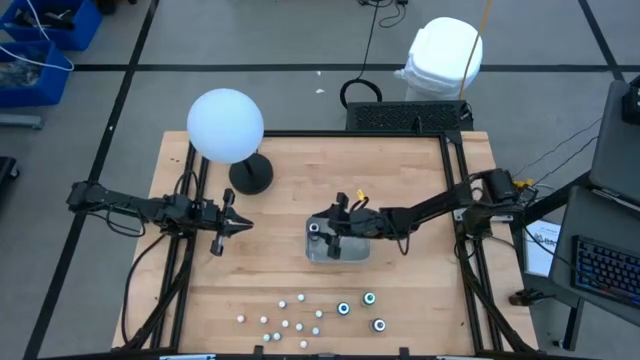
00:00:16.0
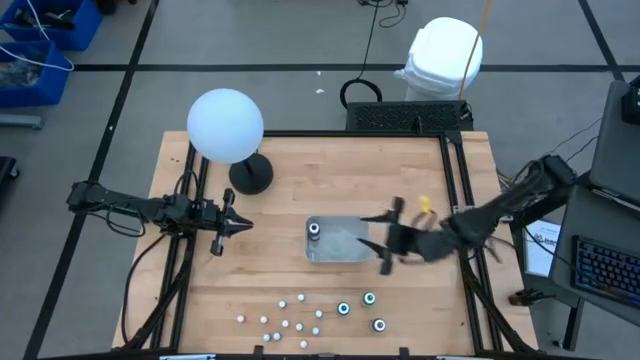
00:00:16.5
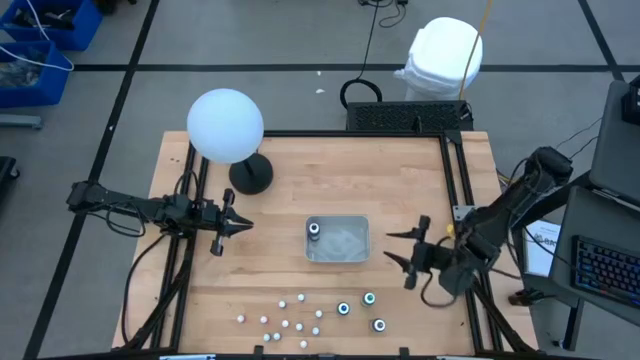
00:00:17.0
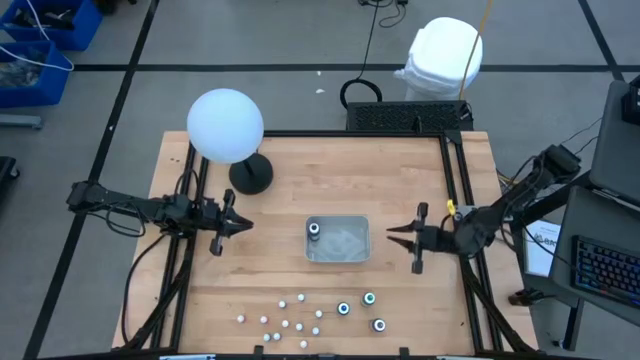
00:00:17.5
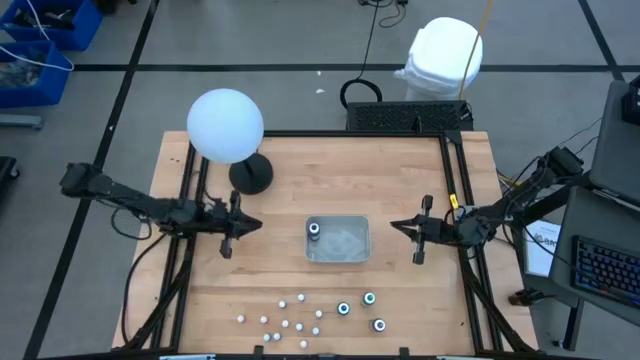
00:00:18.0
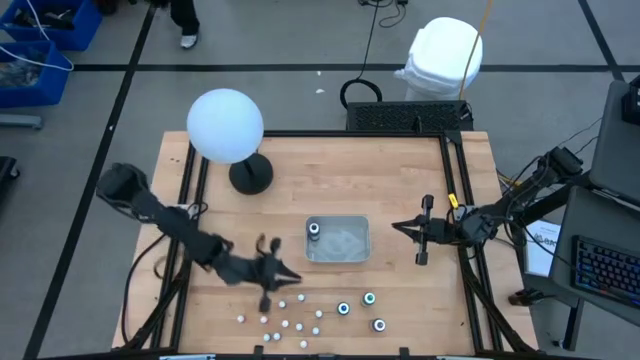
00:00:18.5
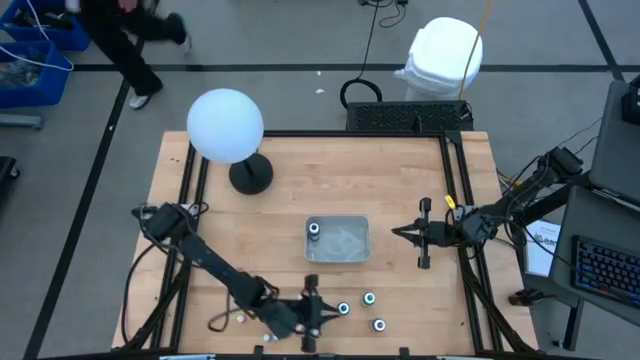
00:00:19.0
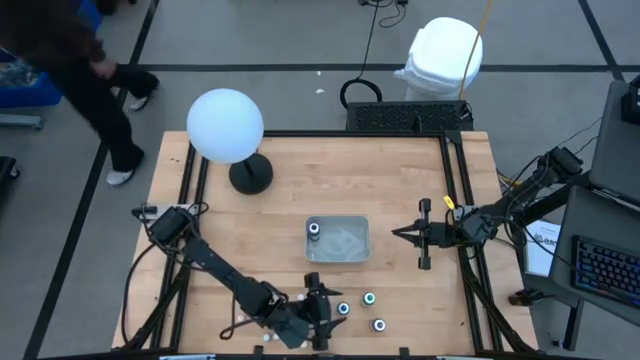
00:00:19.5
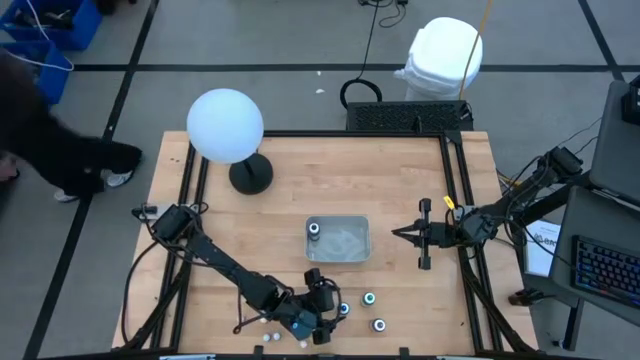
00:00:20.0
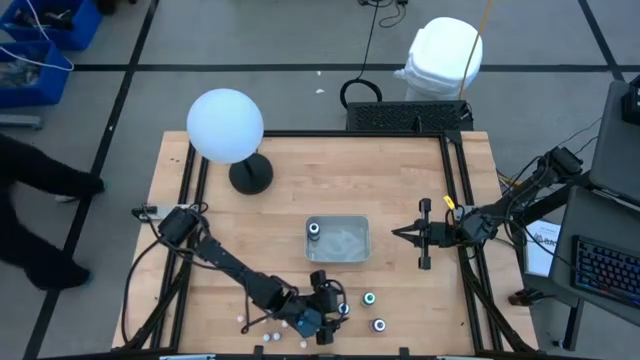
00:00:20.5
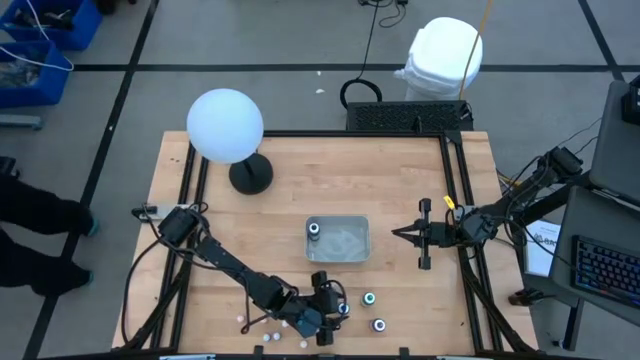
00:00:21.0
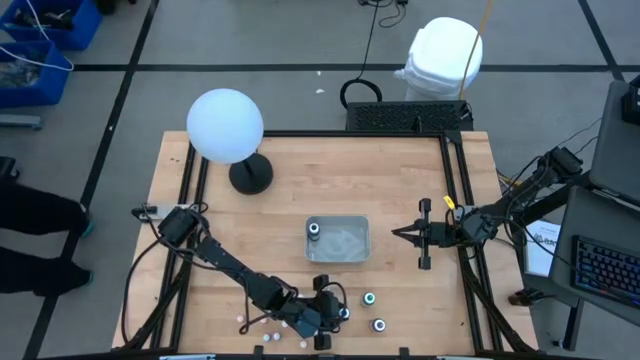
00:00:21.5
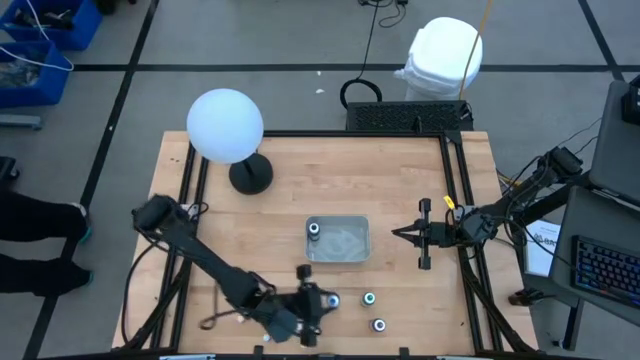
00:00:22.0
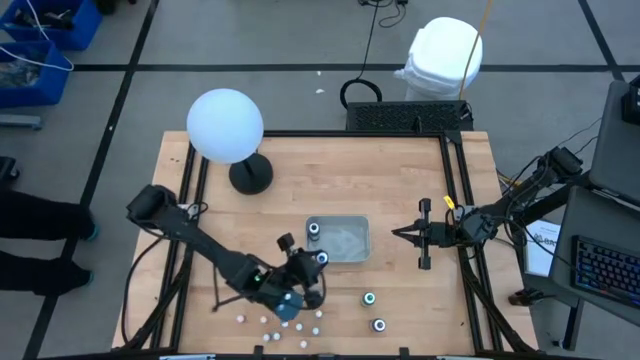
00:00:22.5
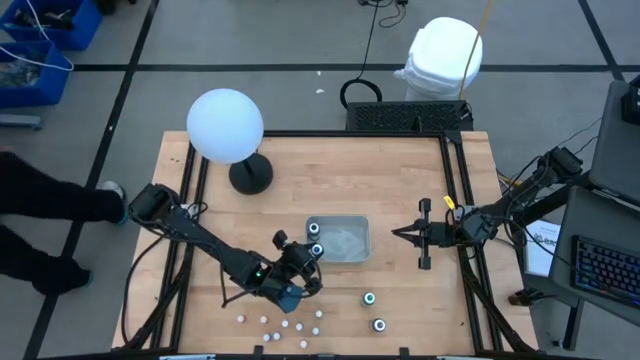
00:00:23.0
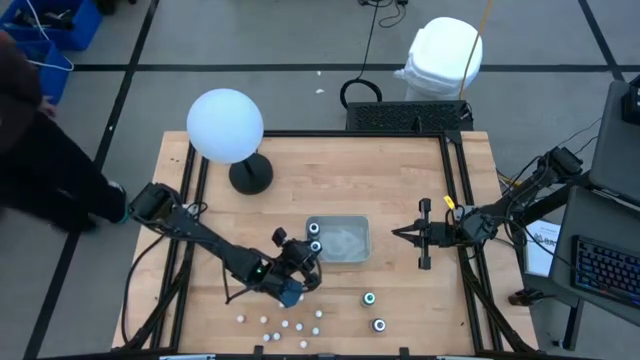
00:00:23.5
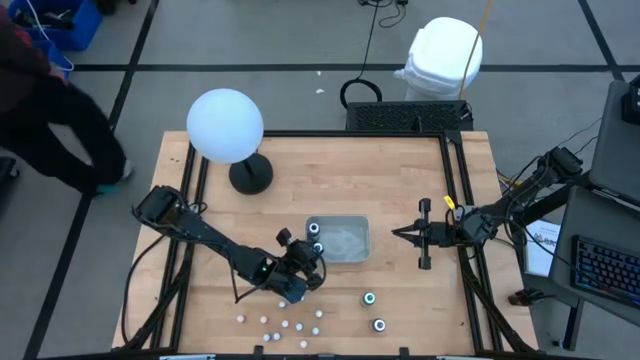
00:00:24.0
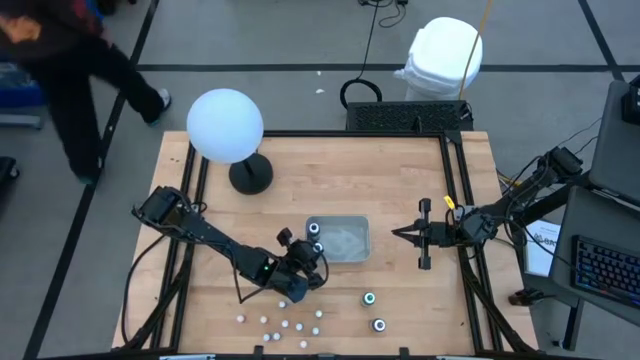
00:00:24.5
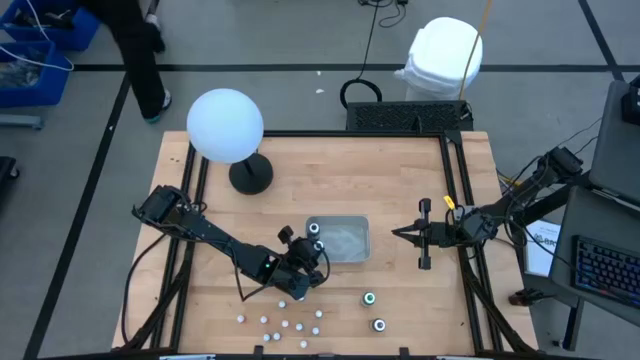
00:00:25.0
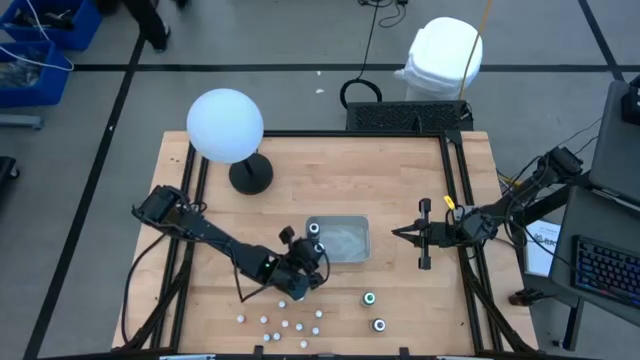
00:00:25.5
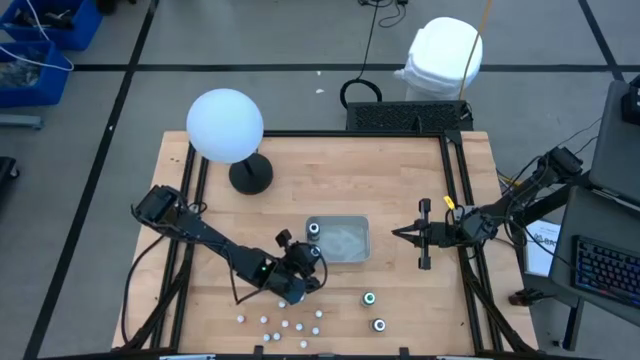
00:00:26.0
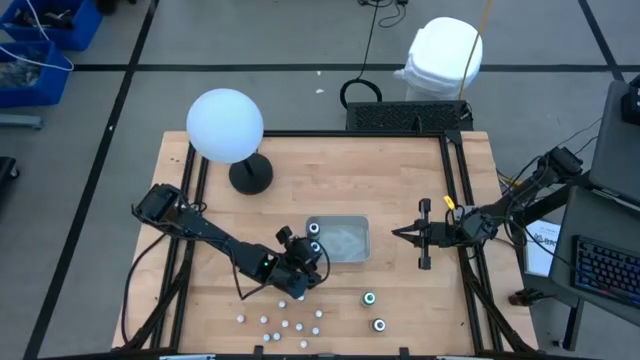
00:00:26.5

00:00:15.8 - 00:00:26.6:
Task: Pick & Place food coloring
Put the large blue food coloring bottle into the gray bin

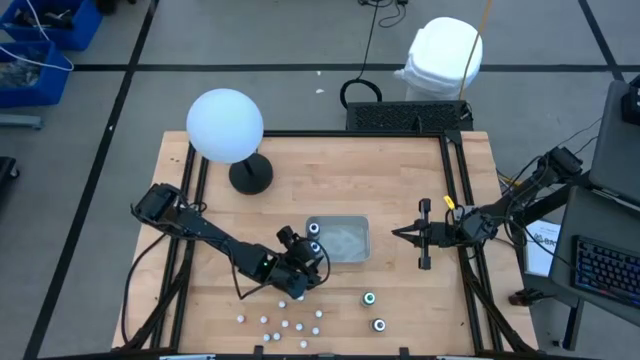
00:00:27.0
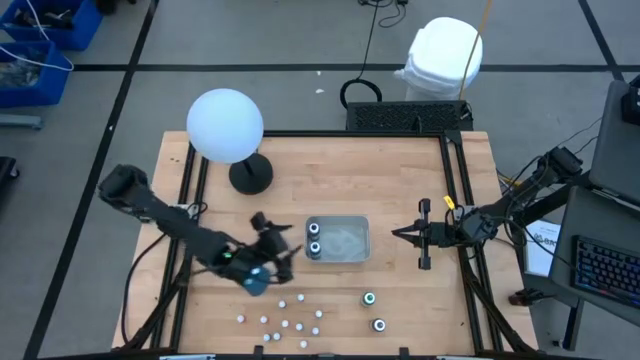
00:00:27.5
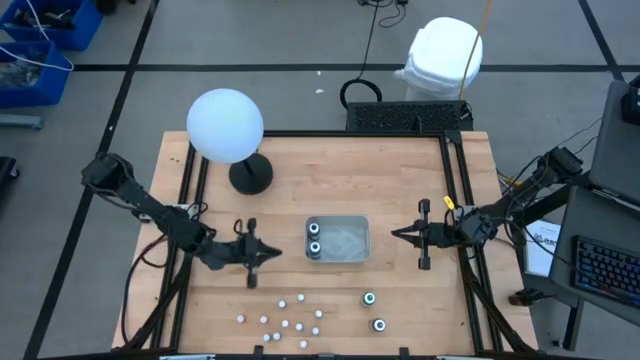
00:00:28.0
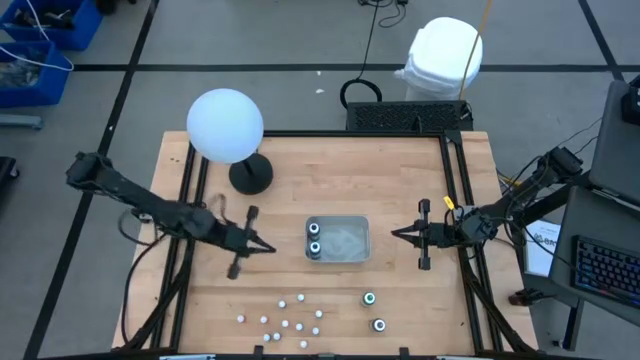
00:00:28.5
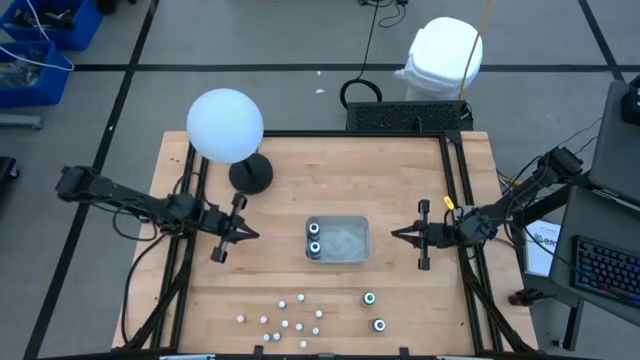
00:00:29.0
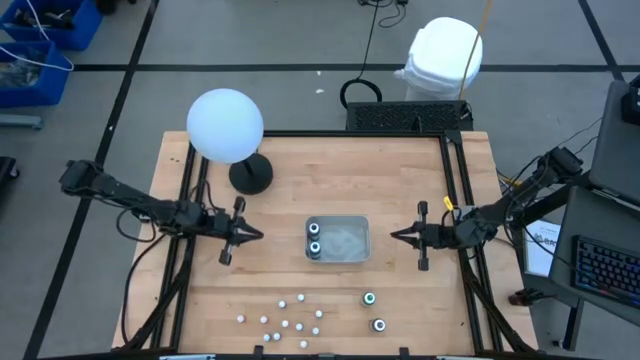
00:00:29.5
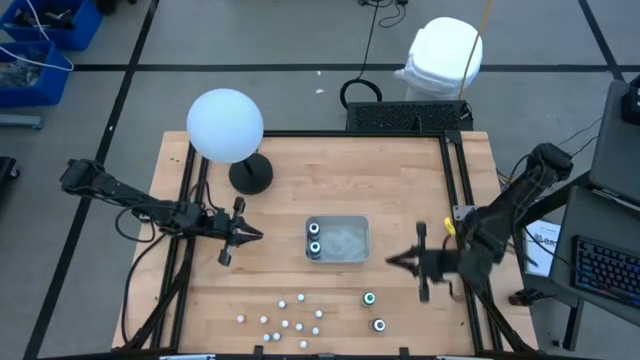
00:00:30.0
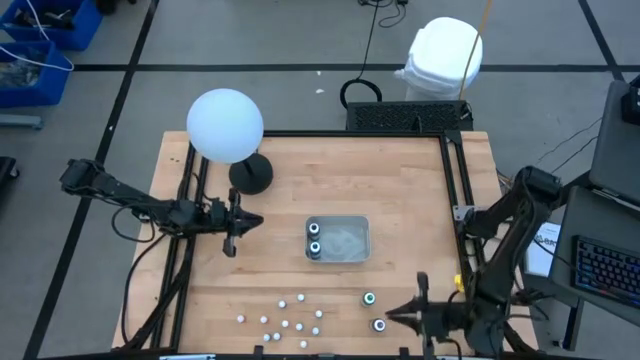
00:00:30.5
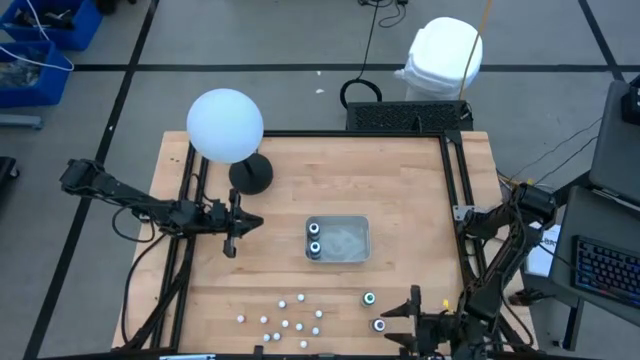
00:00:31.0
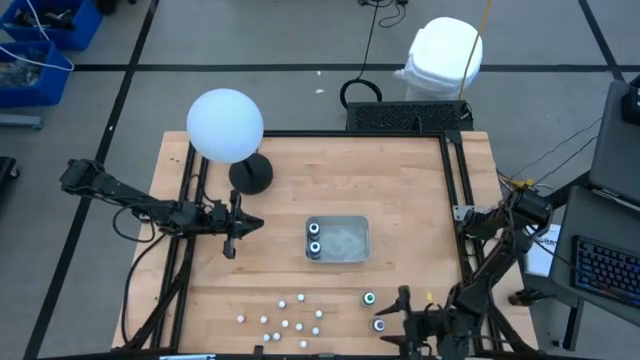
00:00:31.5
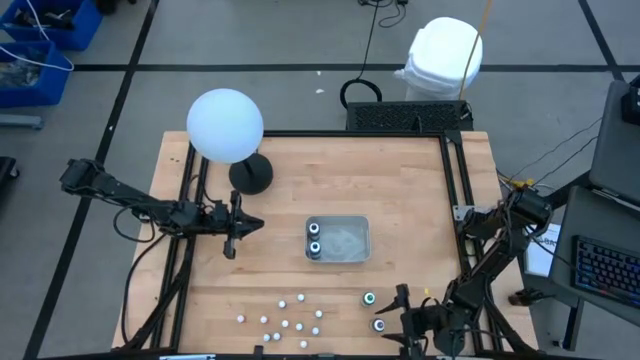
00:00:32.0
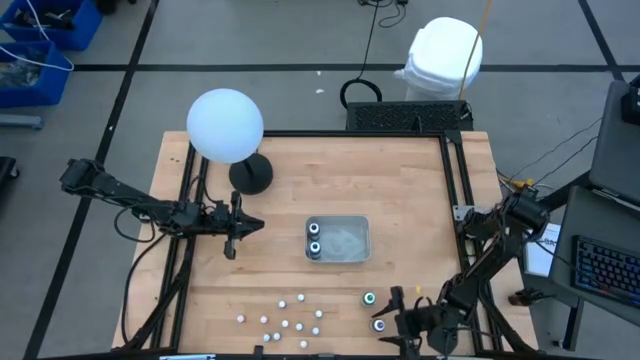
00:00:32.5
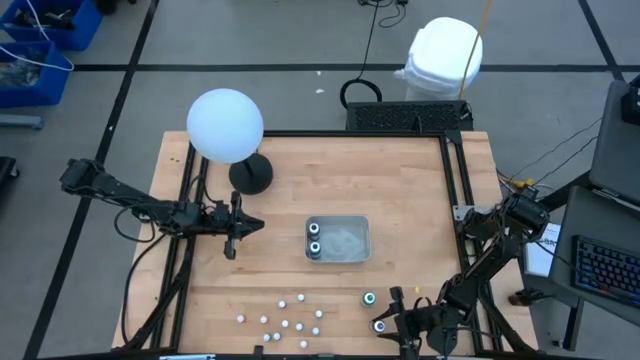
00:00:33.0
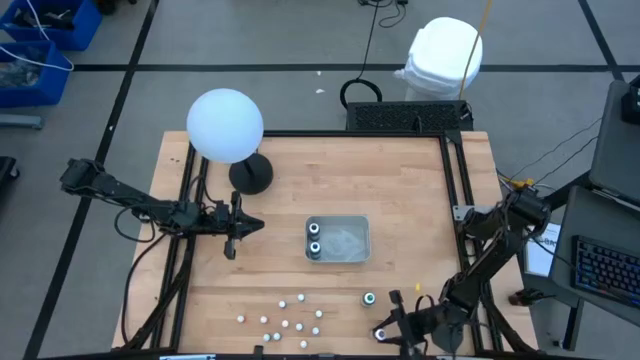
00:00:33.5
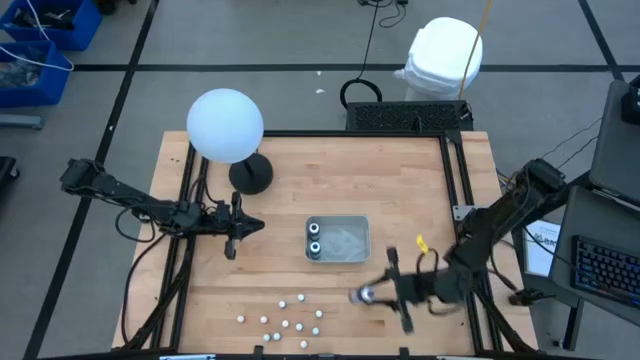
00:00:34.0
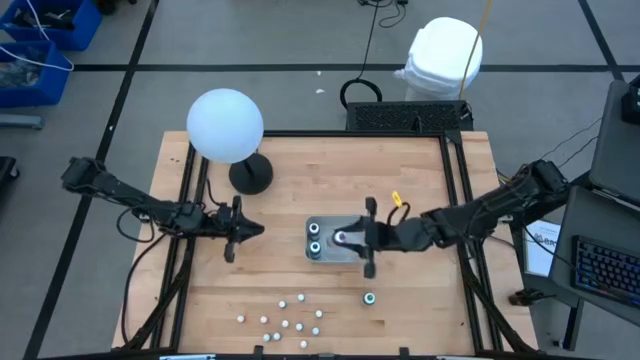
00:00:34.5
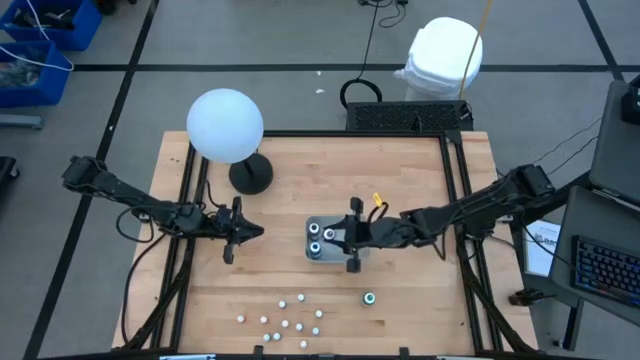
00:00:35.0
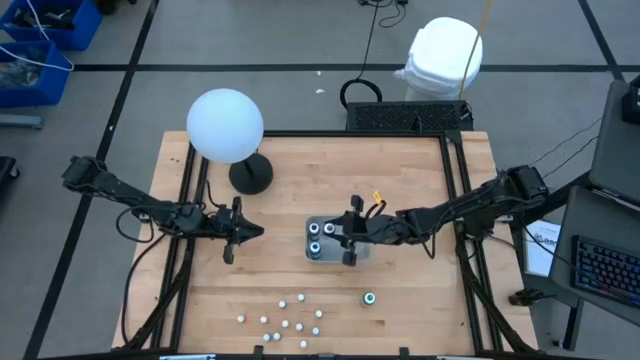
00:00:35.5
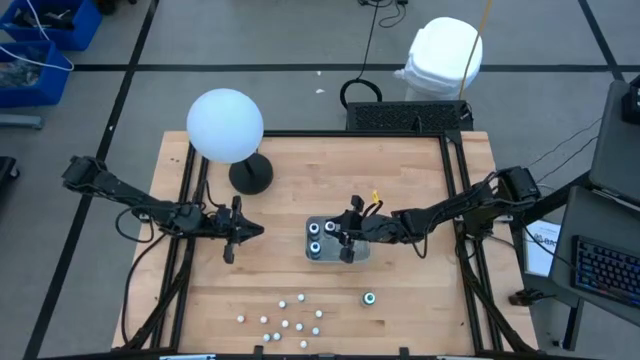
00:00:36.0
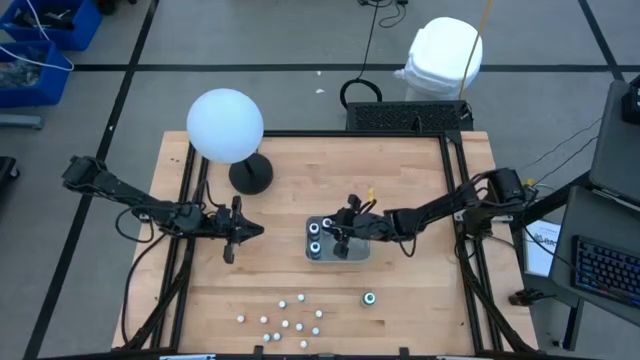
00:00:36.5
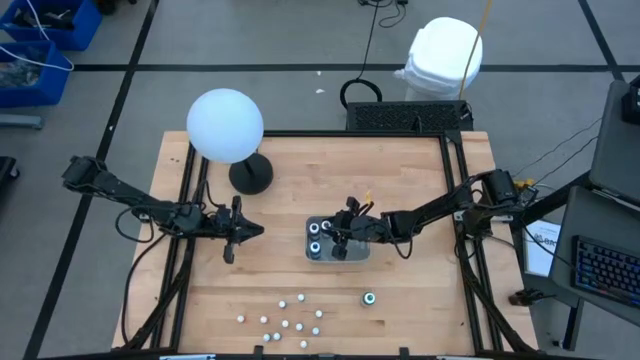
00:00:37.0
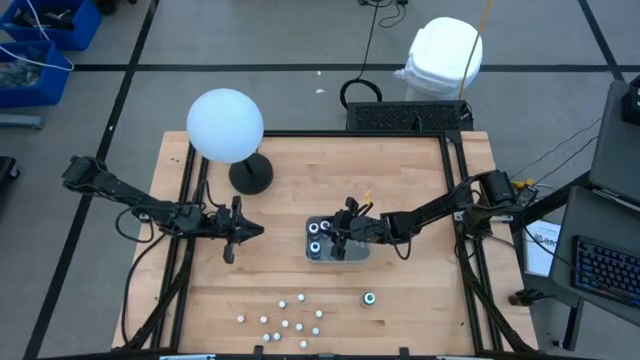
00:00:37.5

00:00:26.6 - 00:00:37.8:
Put the large purple food coloring bottle into the gray bin

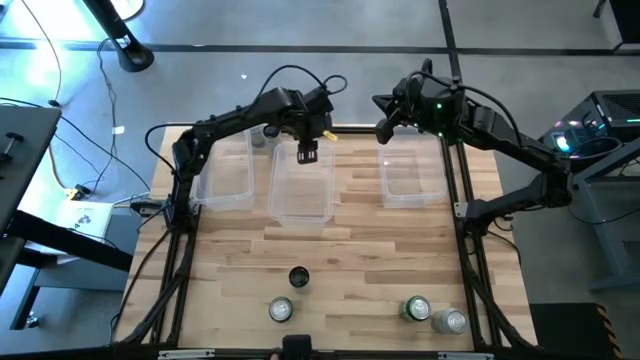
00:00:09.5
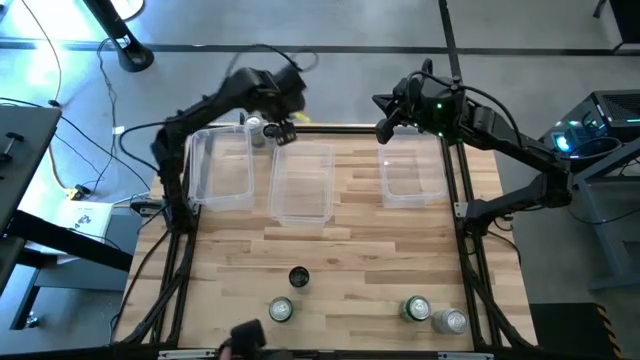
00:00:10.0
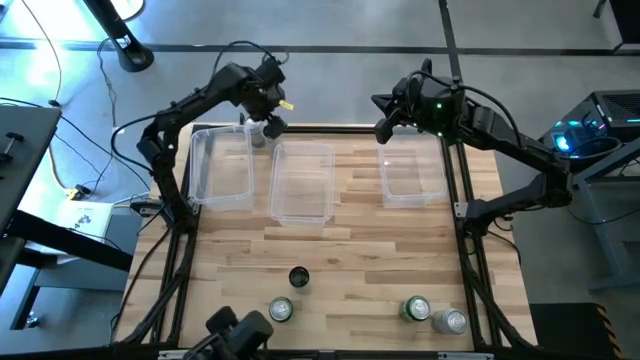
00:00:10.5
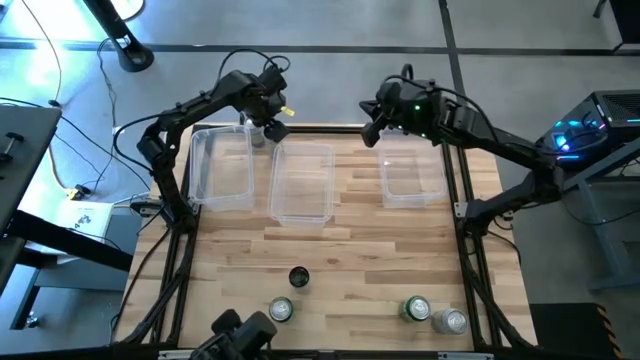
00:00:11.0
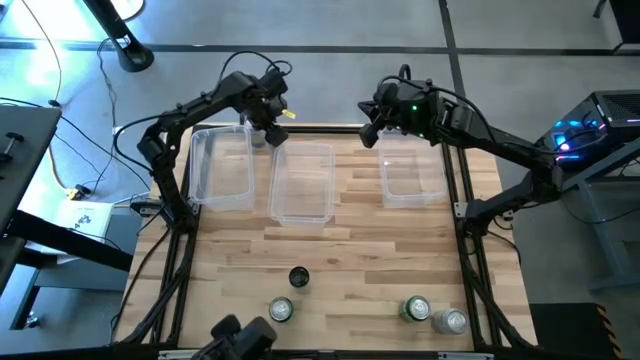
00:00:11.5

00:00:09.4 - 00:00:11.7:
Task: Sort soda cans
Put the top white yellow soda can into the left transparent bin
